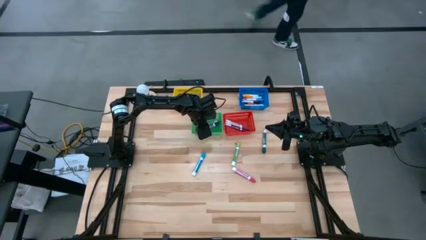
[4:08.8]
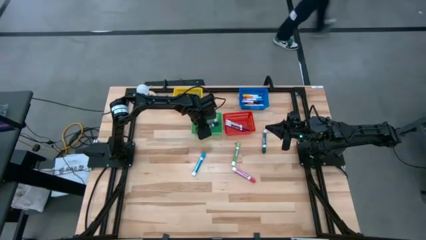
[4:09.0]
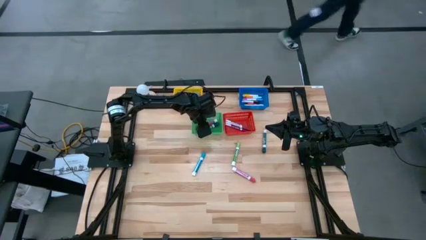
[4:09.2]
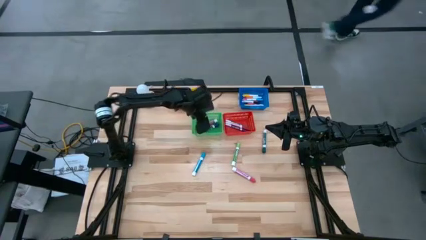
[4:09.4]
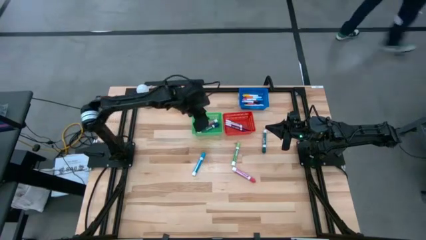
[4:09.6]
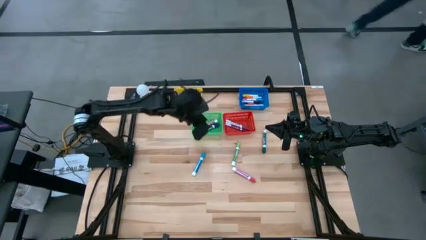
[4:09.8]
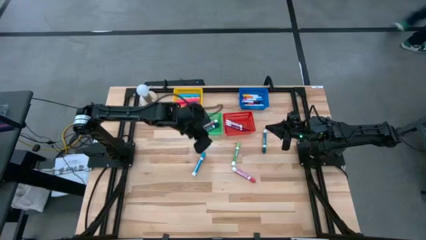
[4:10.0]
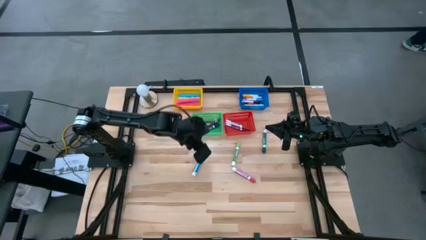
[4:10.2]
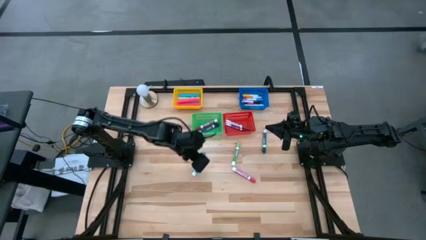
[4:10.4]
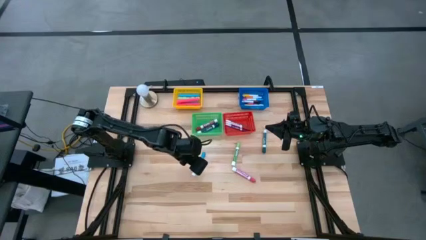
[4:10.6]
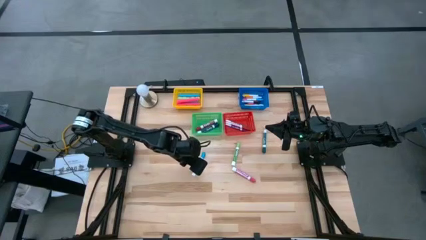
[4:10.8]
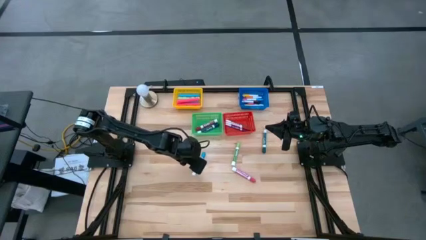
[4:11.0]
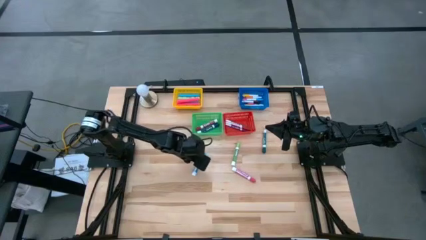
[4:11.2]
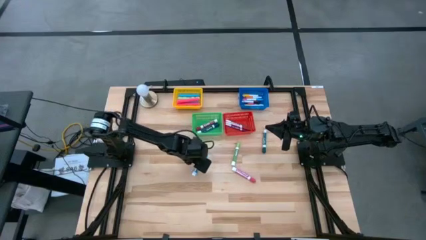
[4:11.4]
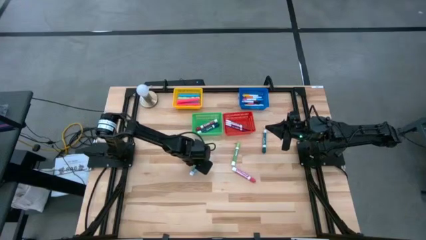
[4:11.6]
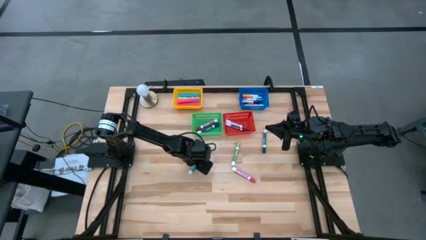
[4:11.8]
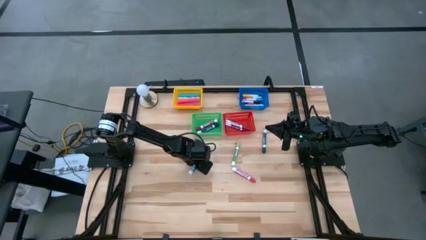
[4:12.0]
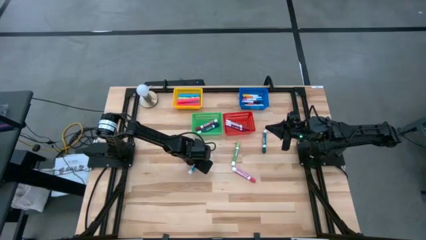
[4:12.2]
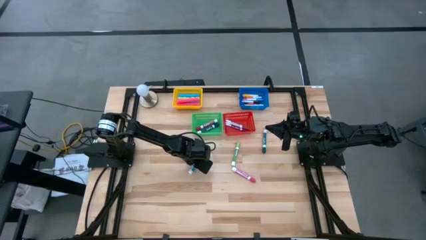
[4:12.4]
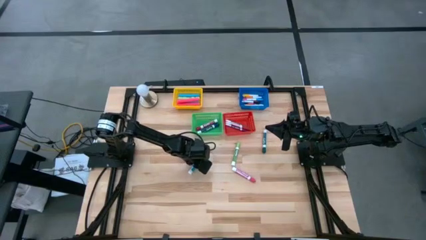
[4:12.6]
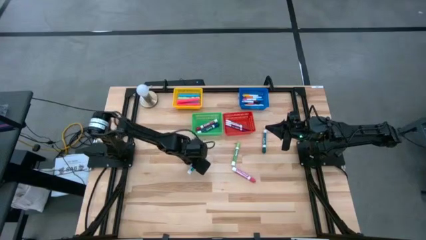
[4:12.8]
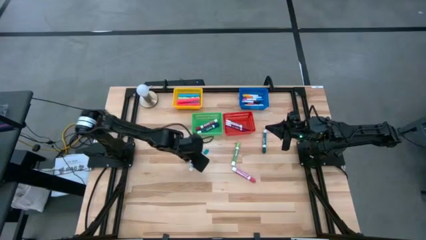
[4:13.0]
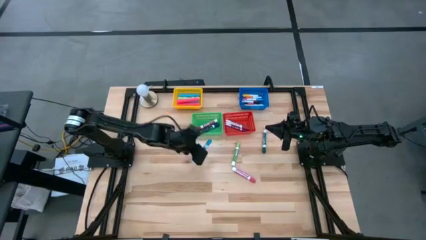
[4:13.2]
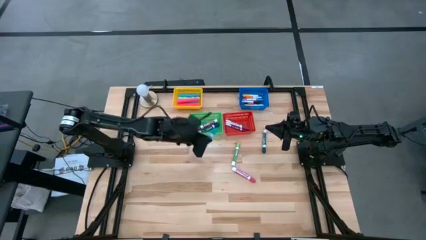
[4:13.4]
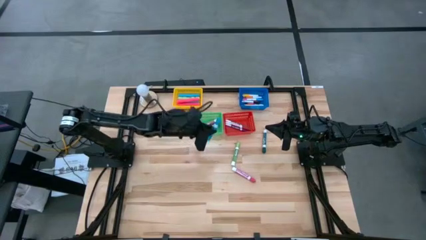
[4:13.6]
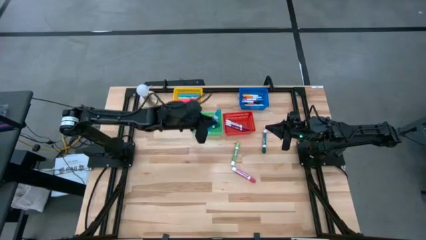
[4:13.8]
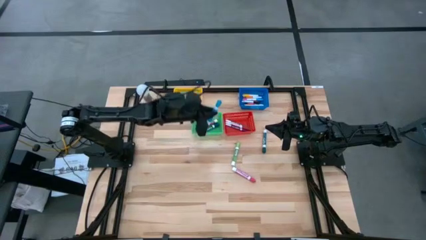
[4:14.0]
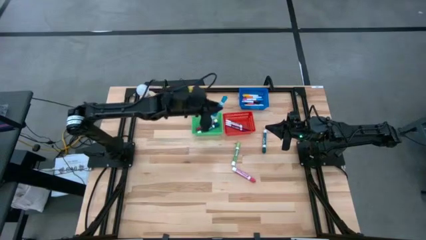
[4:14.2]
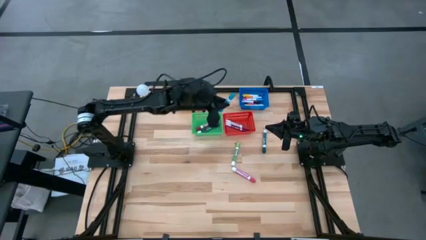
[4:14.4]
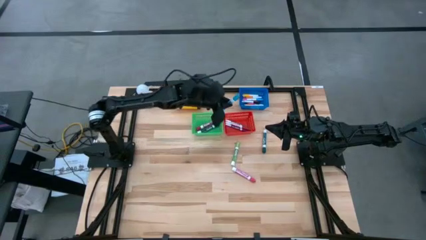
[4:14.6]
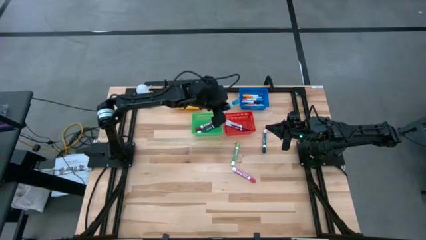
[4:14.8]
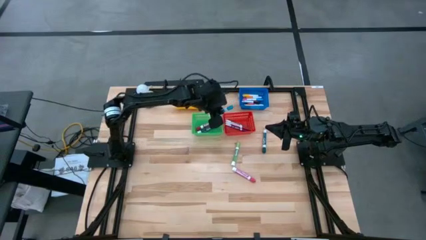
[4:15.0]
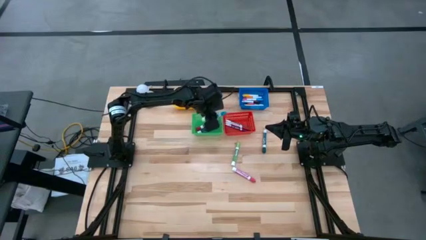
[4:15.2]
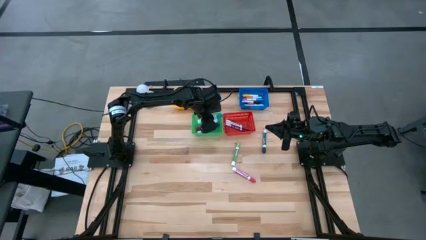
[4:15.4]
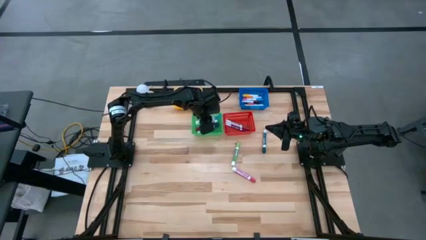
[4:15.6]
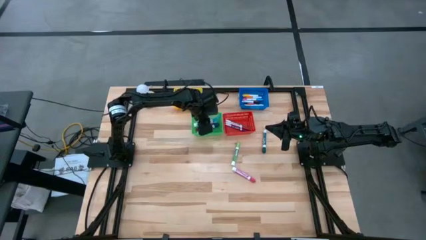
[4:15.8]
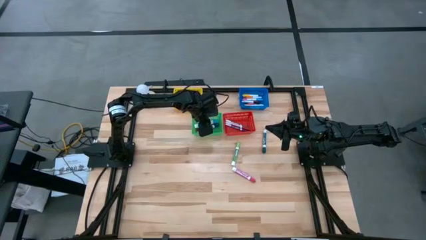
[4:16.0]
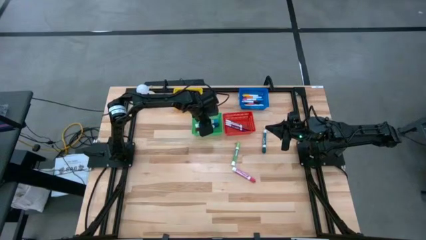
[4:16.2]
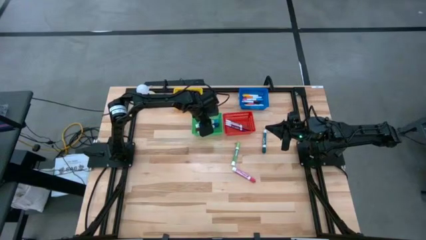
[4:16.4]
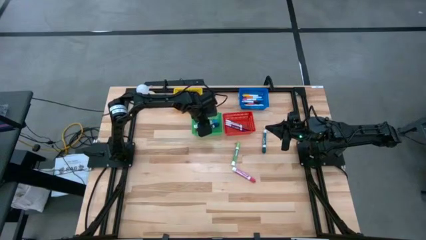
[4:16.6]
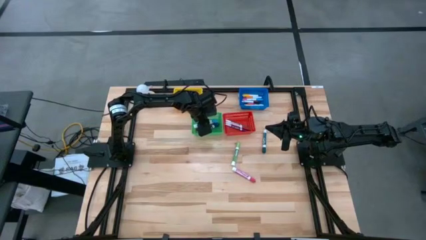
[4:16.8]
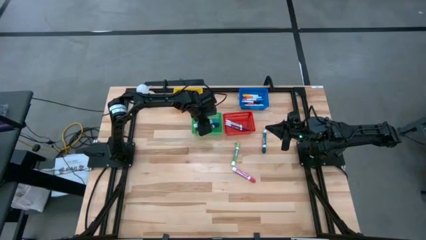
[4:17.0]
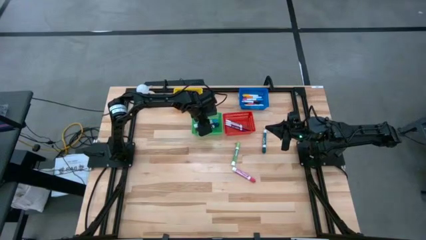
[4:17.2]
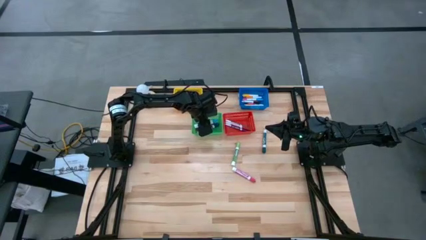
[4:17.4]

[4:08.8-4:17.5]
Task: Pick & Place Markers
Put the large light blue marker into the green bin

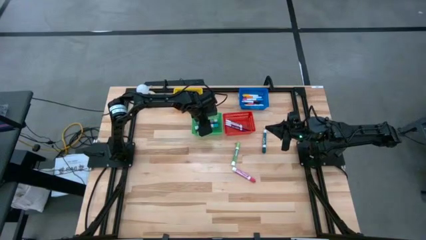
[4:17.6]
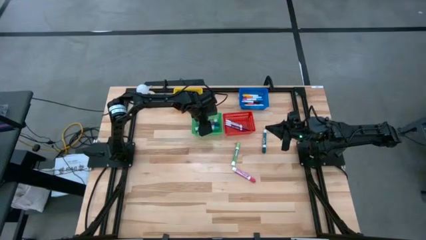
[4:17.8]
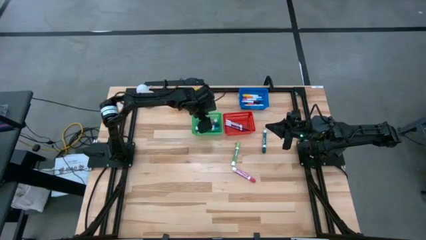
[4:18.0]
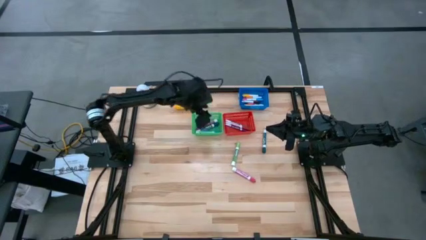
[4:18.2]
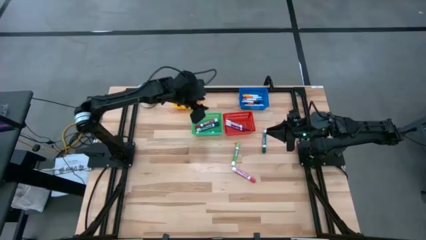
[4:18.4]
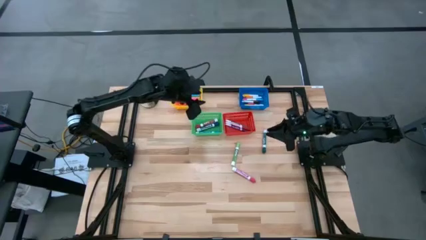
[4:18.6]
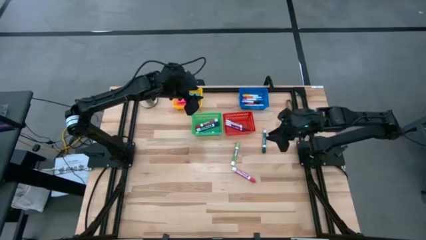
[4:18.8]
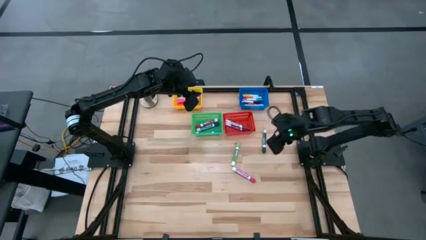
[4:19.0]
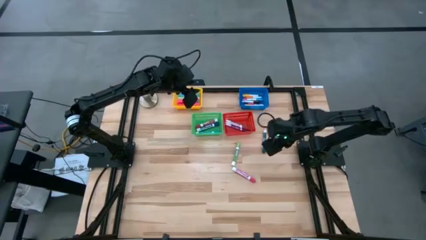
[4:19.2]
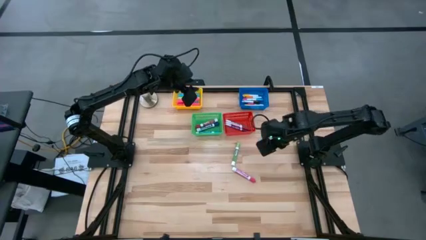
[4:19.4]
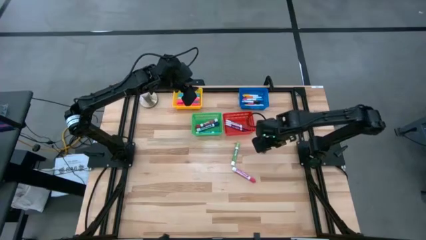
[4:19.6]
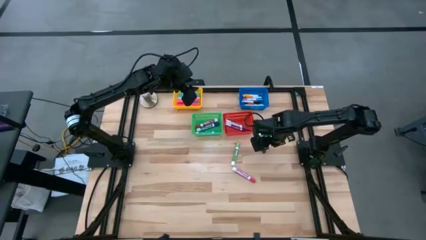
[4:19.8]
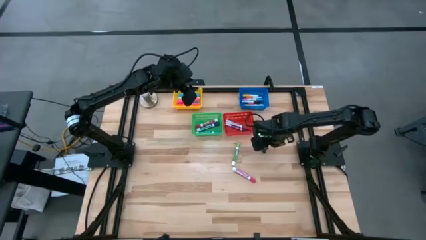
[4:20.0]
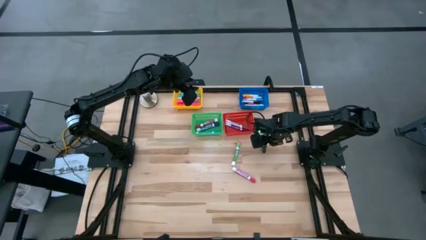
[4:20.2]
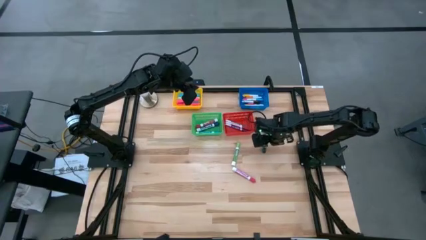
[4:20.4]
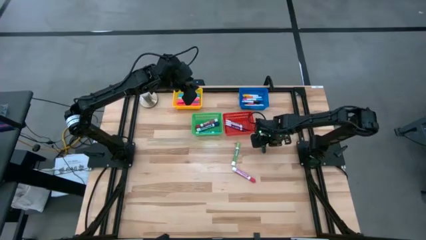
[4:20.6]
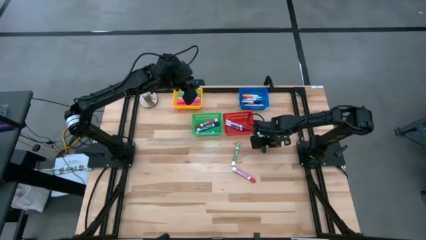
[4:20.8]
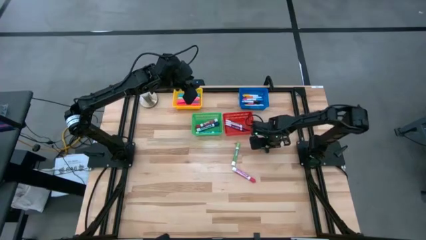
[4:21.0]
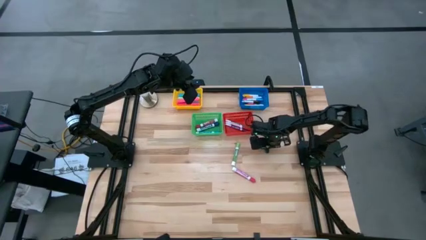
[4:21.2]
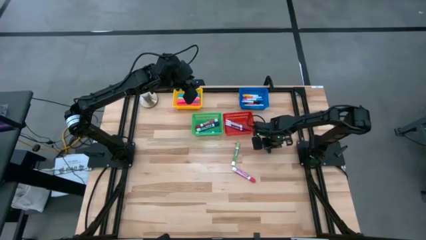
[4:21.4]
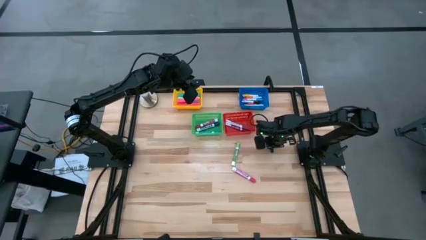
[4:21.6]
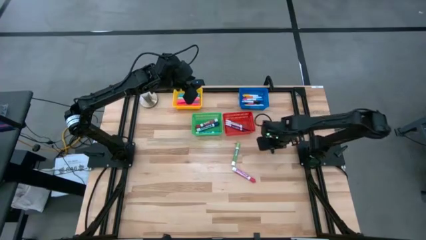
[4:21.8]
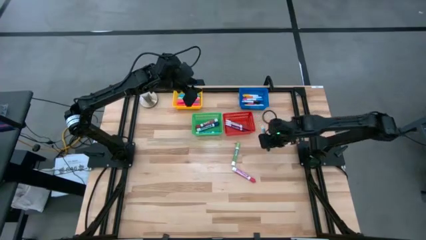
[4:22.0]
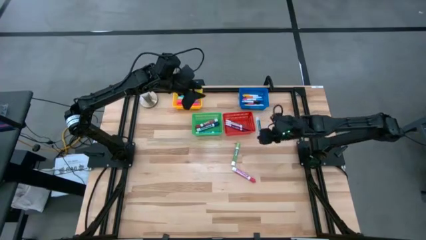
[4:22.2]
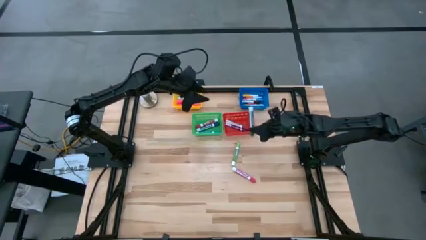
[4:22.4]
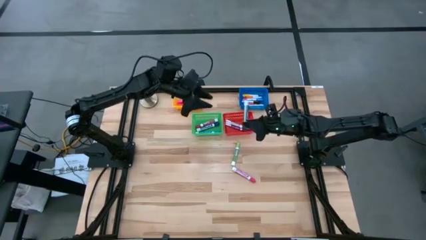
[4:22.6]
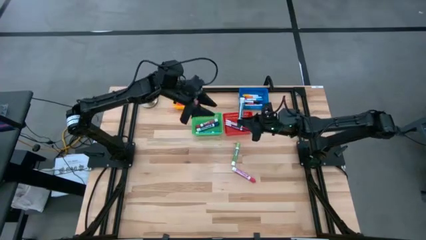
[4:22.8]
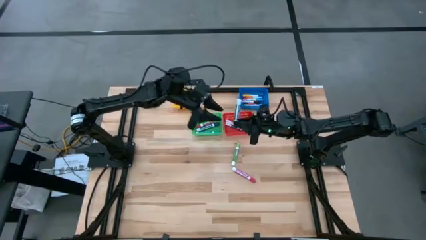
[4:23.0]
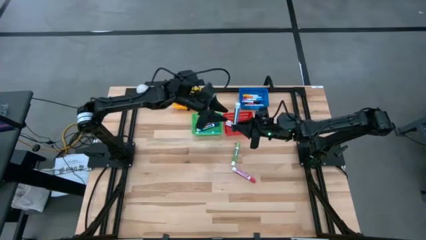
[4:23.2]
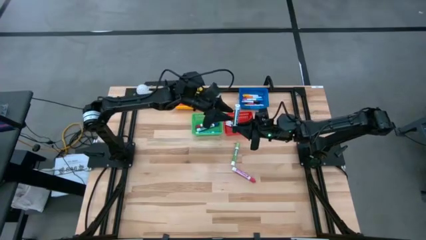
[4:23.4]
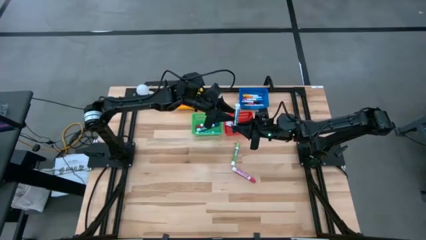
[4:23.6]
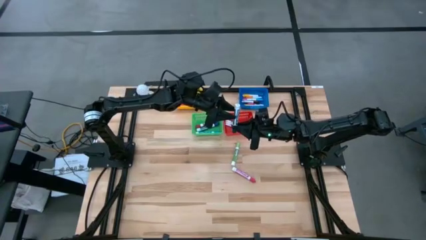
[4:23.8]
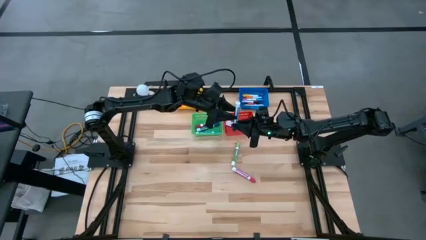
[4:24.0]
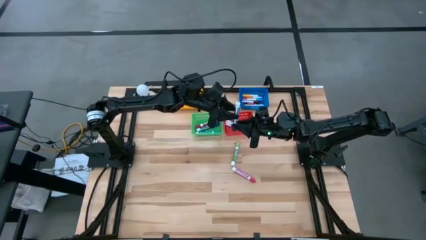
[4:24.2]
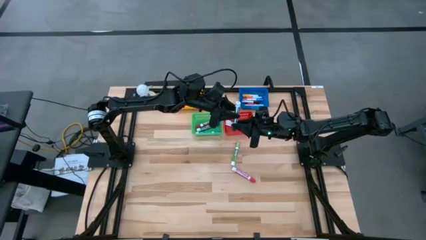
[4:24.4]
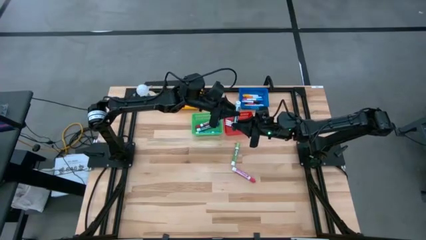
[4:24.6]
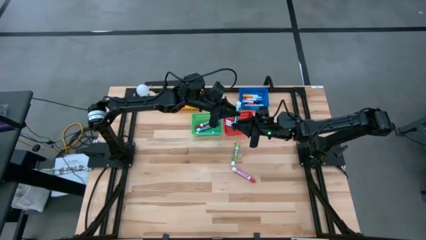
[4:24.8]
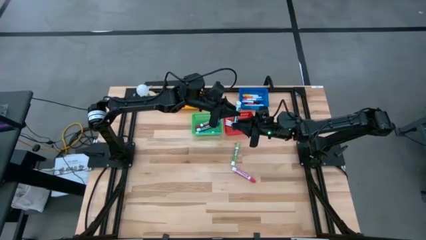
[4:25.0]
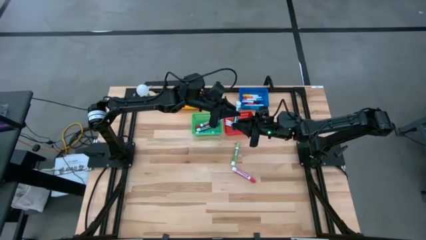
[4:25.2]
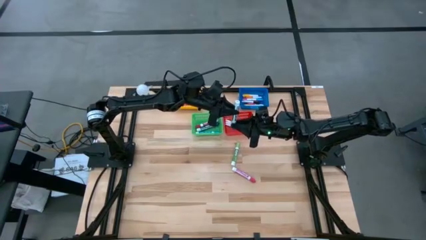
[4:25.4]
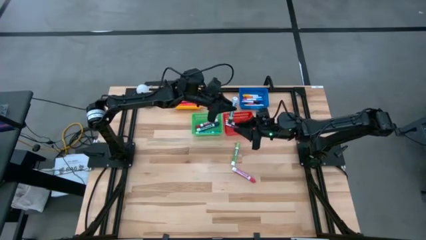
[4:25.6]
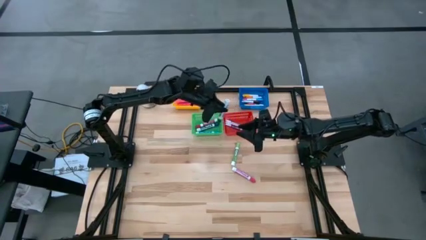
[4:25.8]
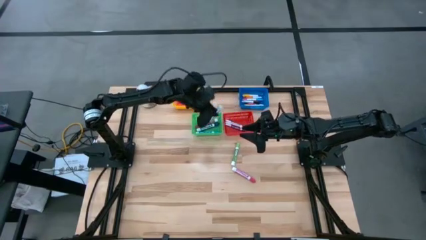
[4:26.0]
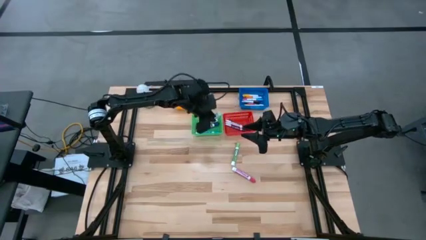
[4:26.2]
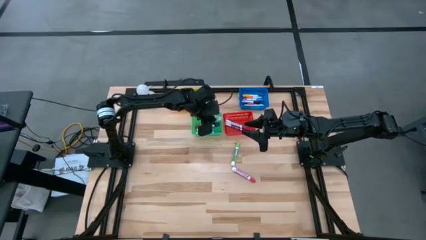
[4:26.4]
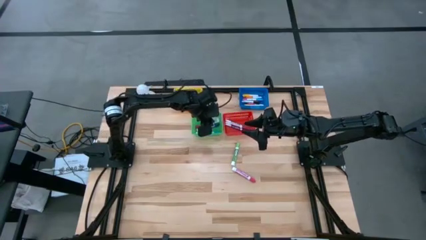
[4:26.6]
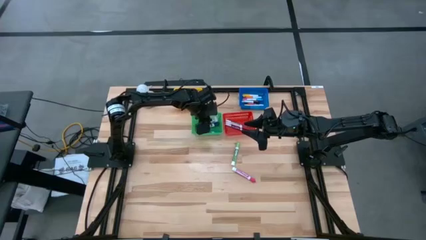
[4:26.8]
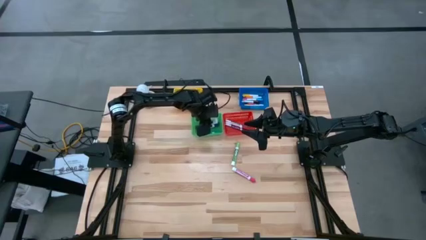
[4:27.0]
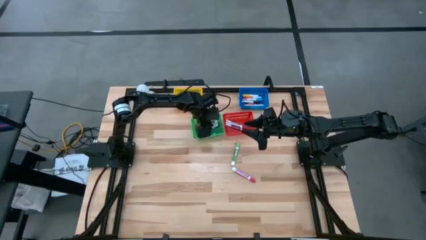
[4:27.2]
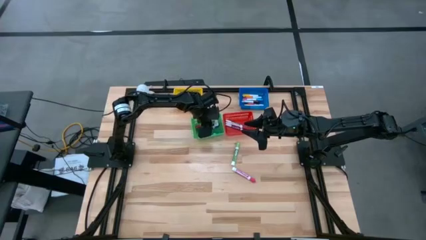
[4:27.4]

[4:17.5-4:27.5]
Put the large green marker into the green bin
